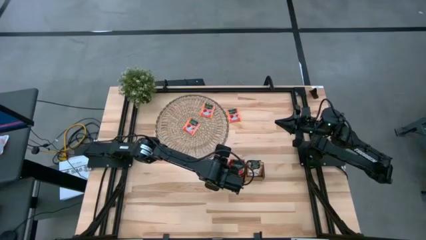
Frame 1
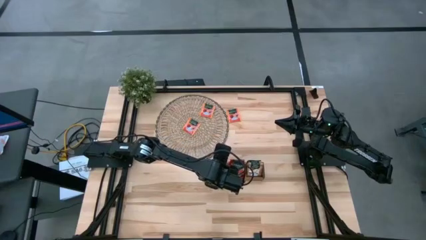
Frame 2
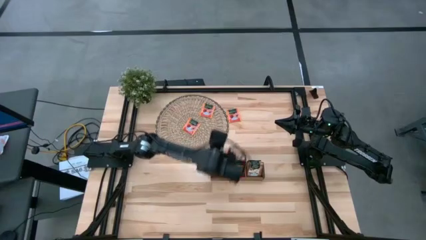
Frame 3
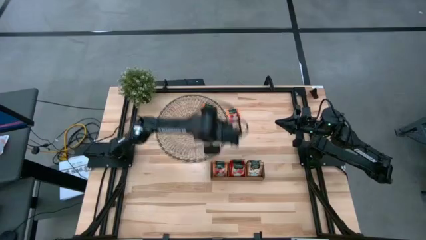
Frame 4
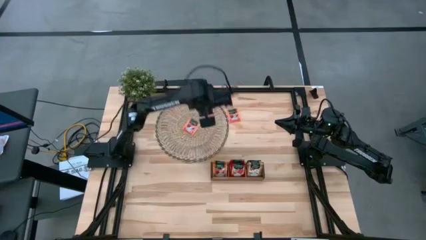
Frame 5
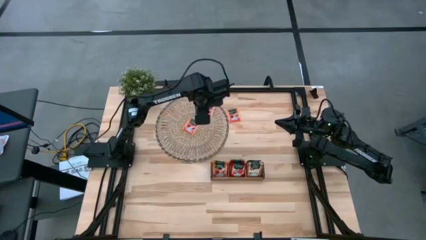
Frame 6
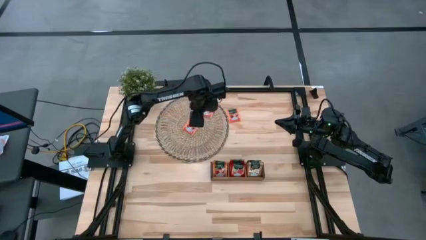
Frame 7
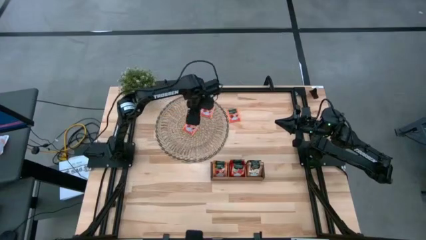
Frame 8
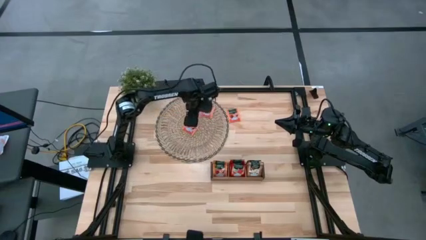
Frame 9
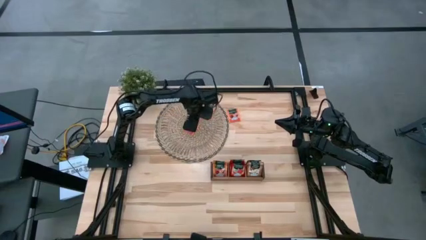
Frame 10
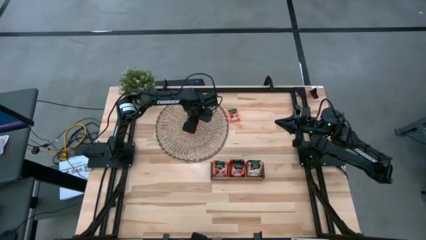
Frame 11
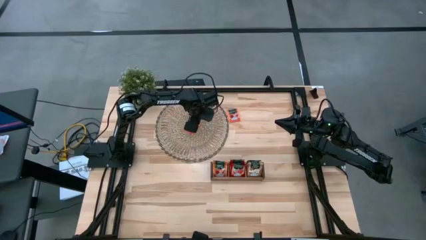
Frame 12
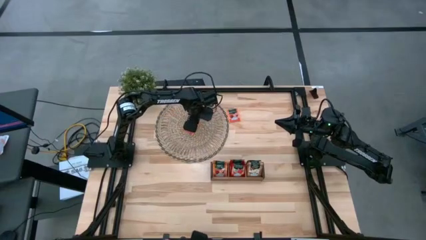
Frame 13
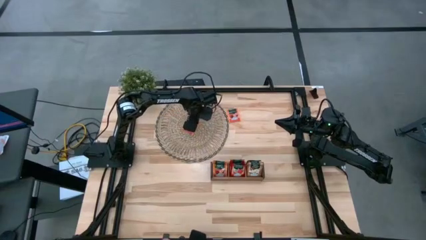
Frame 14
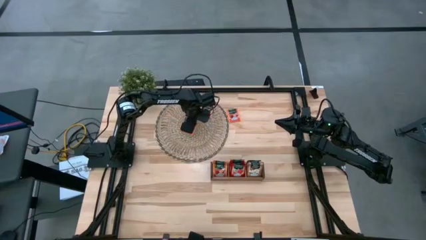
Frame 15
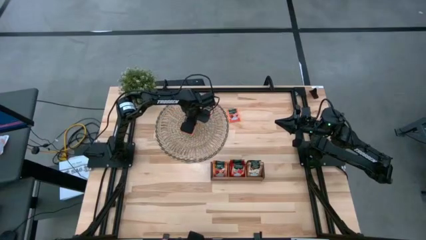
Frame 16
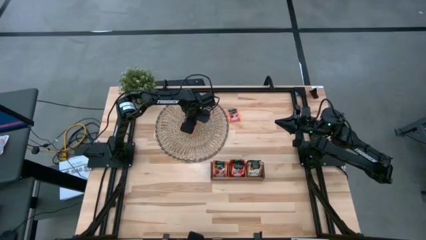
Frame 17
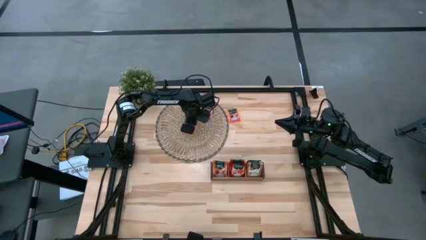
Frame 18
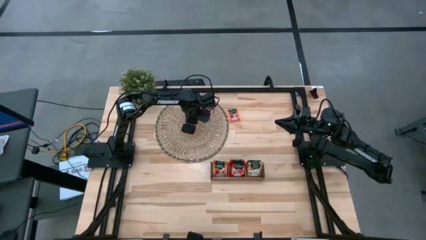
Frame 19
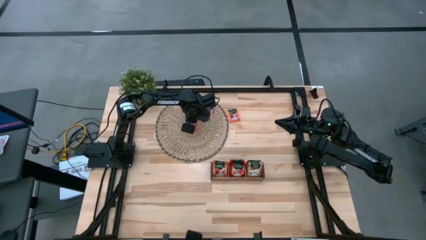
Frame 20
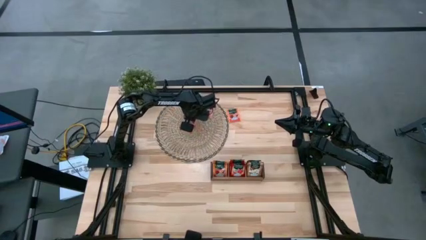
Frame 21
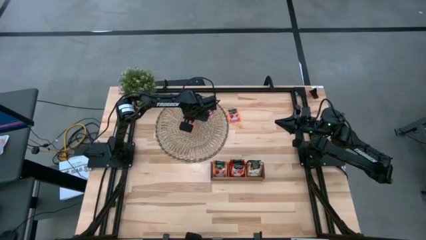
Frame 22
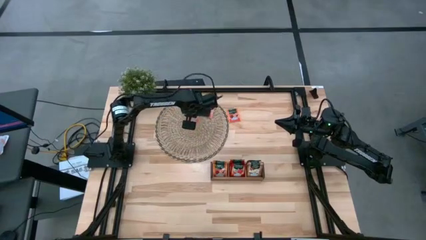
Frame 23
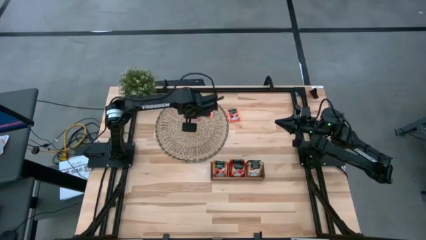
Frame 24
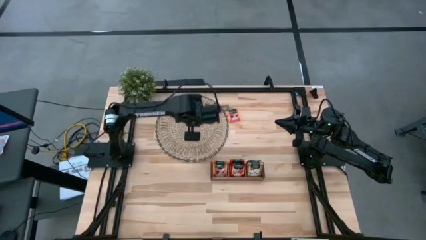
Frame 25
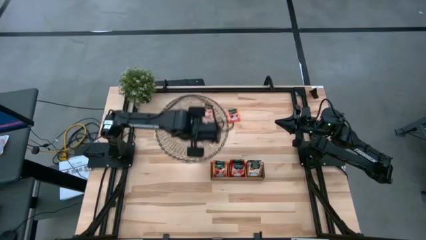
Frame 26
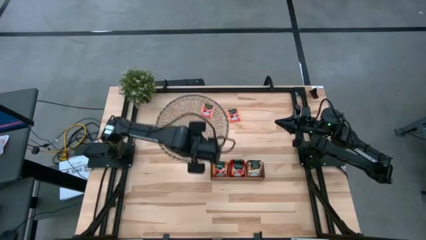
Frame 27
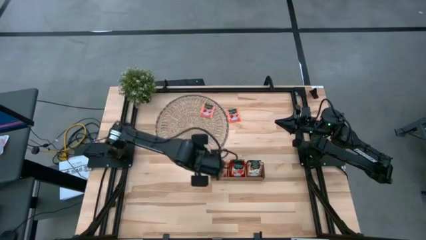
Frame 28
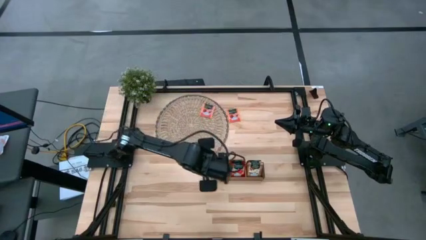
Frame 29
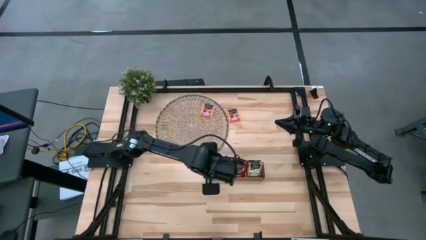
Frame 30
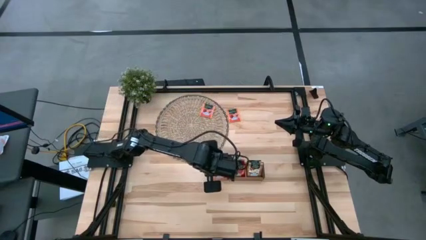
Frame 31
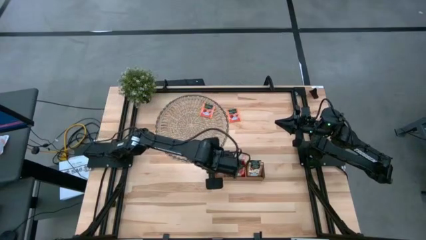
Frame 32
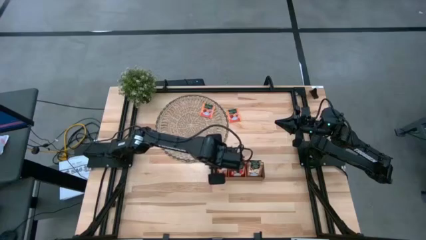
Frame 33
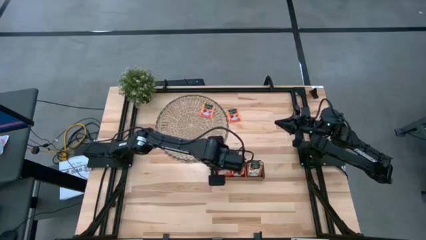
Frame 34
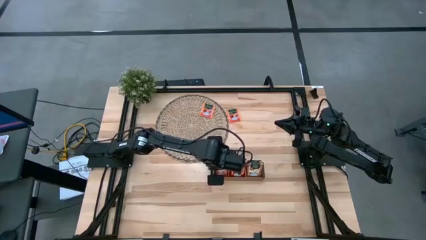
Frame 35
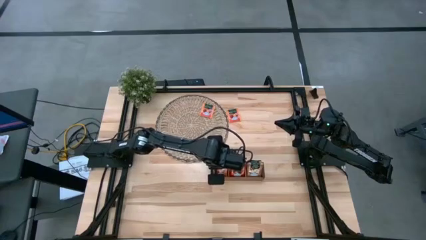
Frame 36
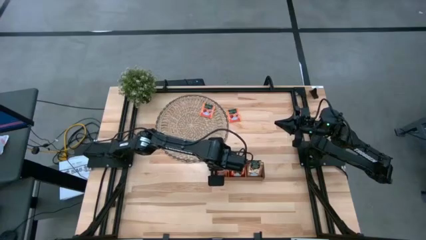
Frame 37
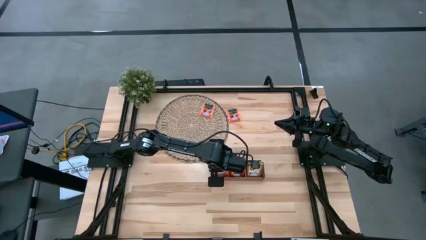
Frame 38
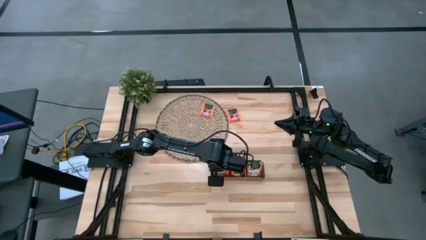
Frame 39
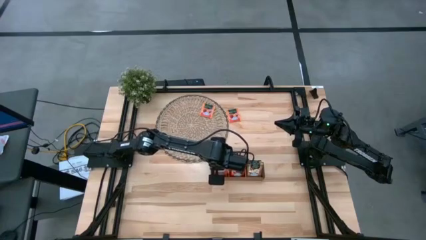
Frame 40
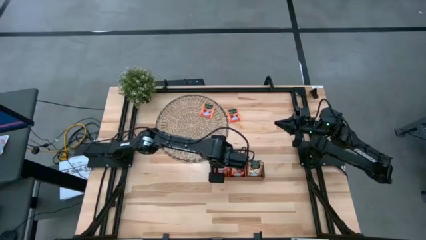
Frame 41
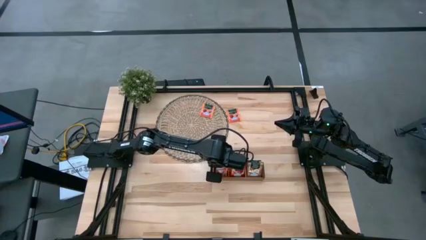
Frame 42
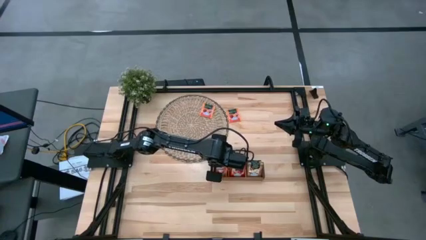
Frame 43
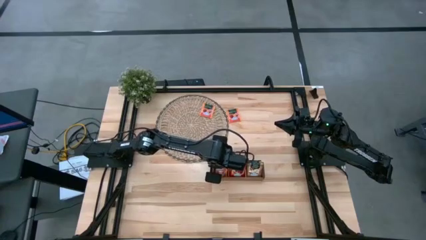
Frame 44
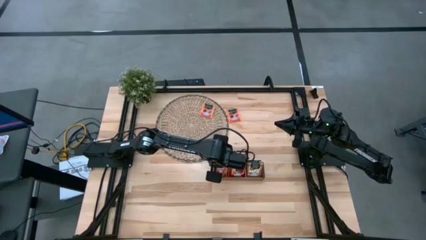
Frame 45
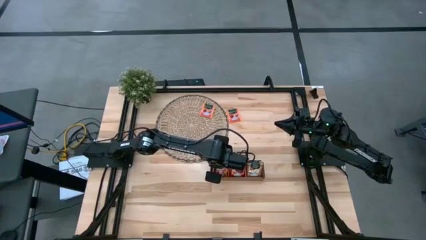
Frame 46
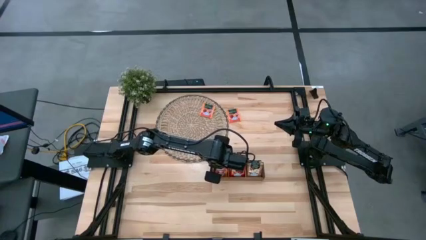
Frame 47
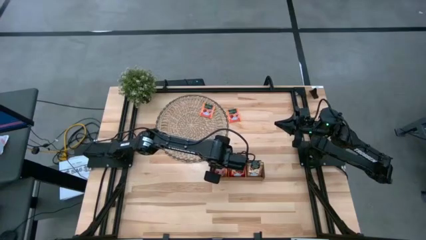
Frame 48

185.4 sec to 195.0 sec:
Task: Pick & Place Tea
Put the bottom orange tea bag into the left slot of the wooden organizer

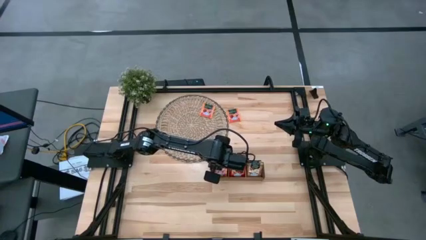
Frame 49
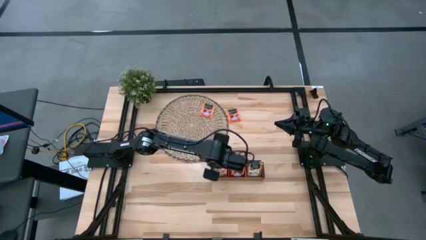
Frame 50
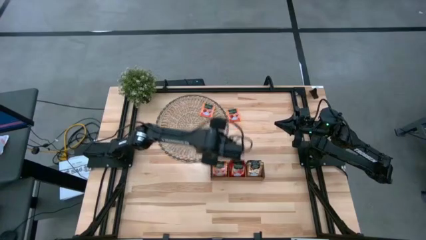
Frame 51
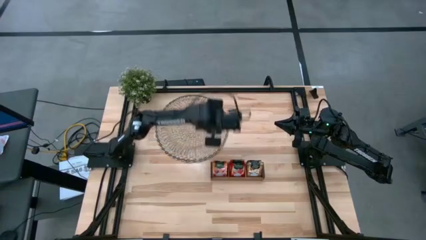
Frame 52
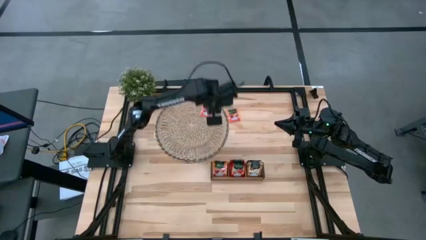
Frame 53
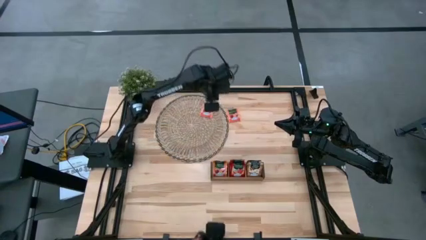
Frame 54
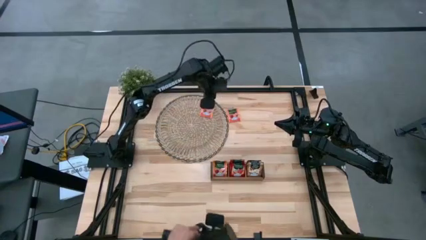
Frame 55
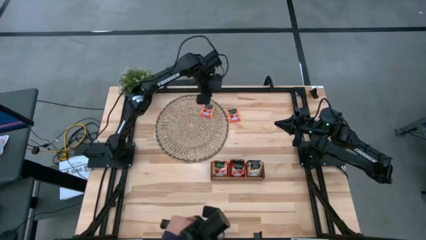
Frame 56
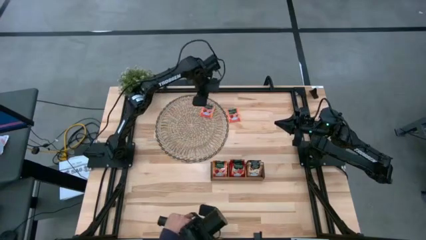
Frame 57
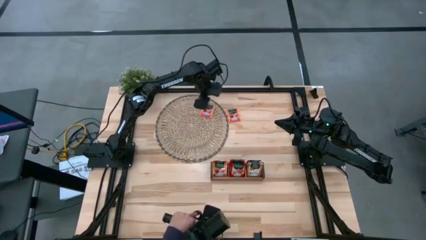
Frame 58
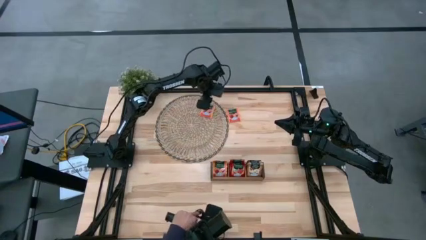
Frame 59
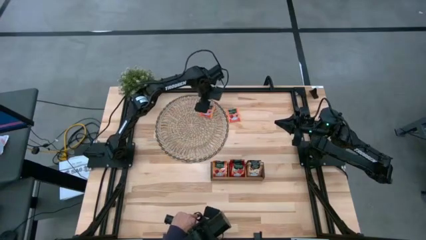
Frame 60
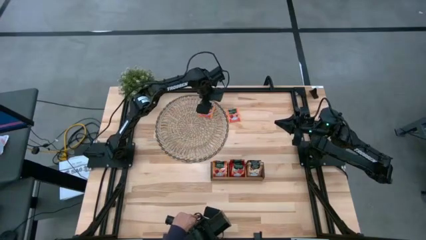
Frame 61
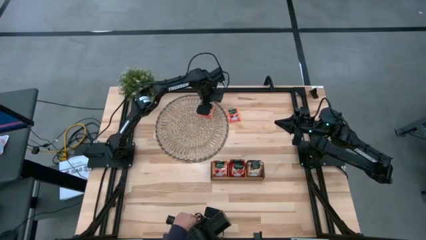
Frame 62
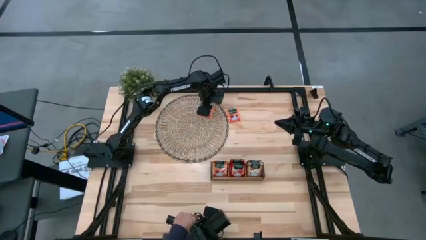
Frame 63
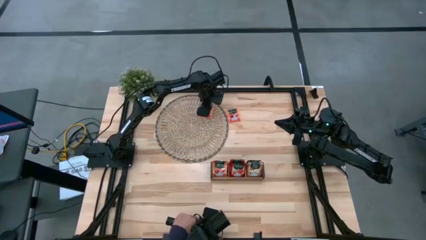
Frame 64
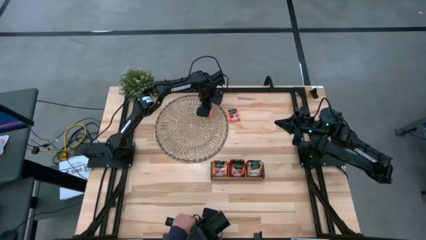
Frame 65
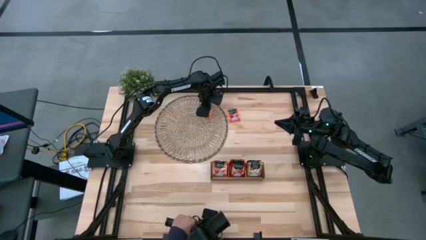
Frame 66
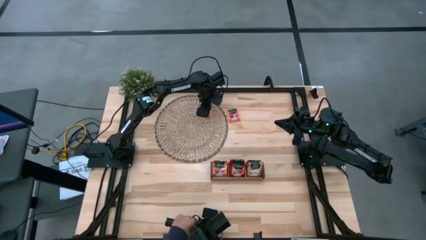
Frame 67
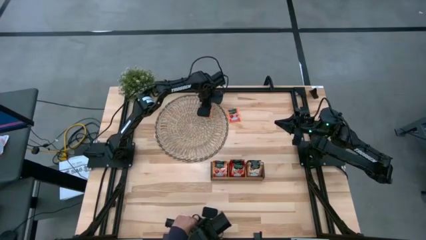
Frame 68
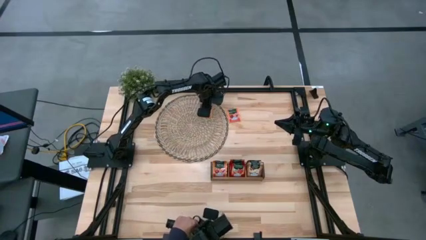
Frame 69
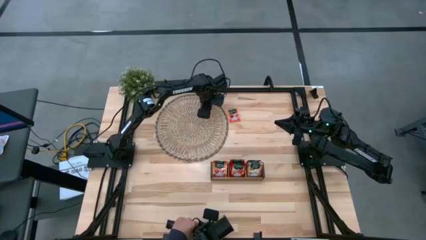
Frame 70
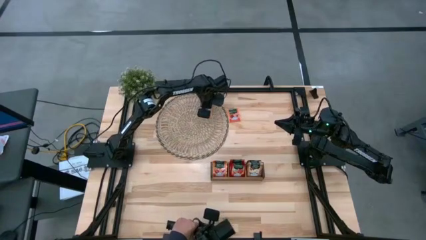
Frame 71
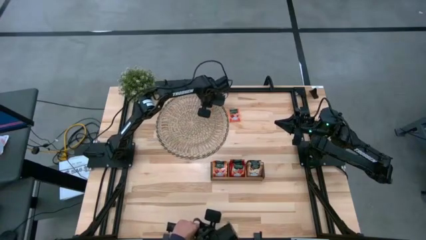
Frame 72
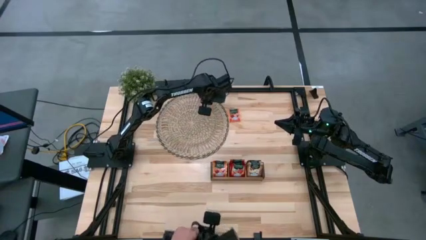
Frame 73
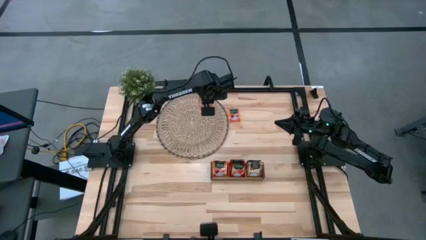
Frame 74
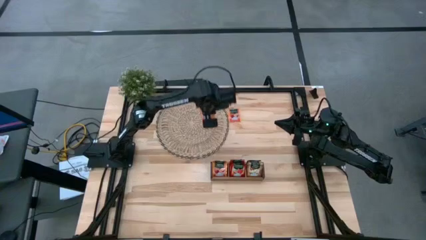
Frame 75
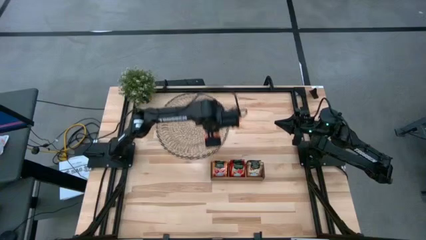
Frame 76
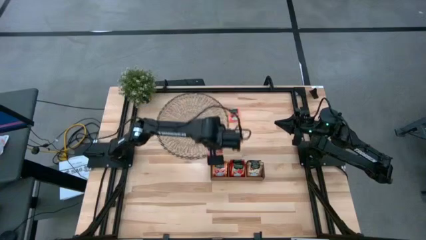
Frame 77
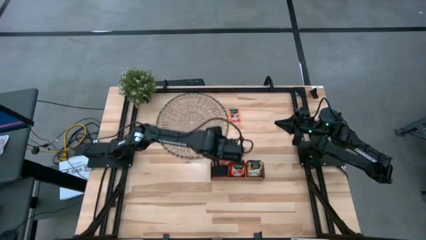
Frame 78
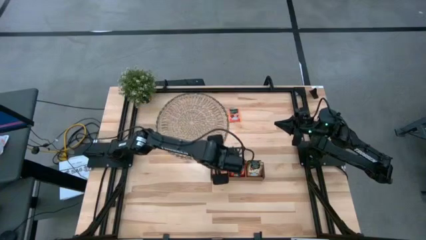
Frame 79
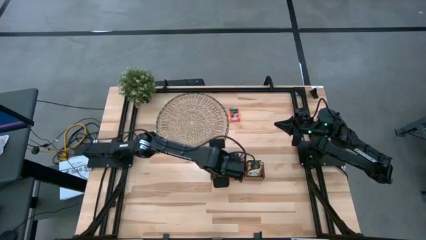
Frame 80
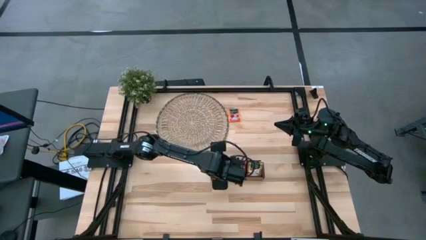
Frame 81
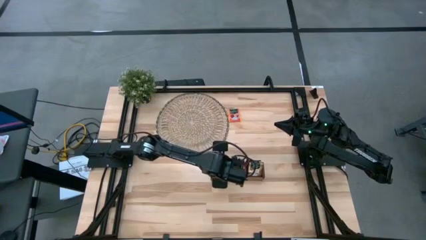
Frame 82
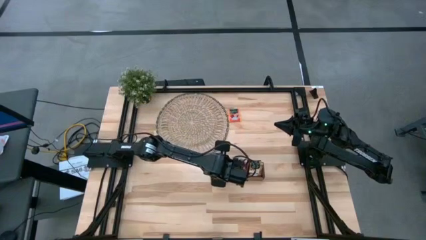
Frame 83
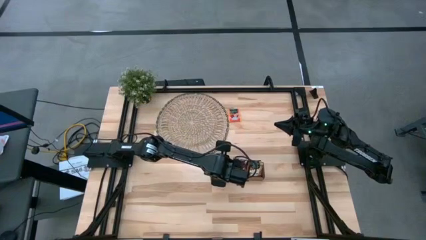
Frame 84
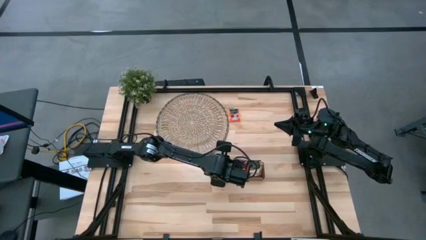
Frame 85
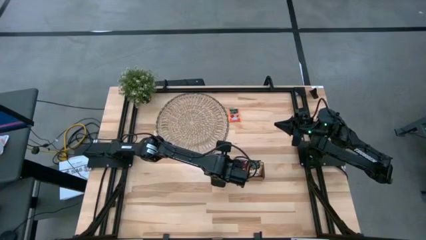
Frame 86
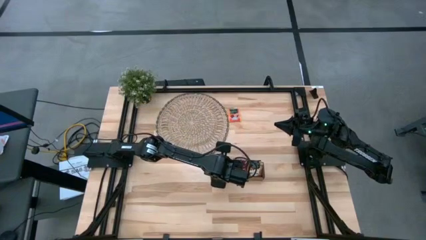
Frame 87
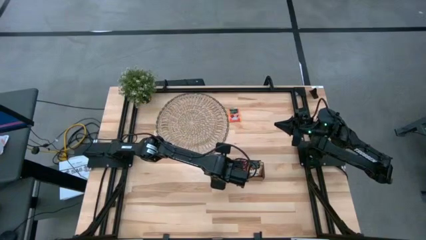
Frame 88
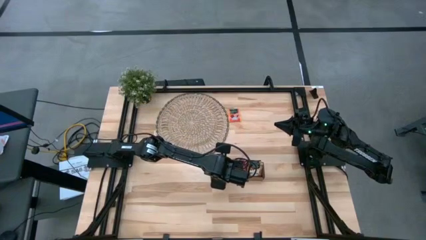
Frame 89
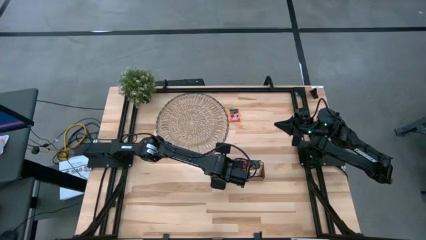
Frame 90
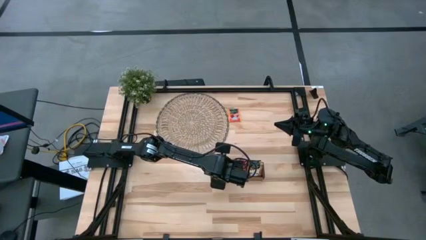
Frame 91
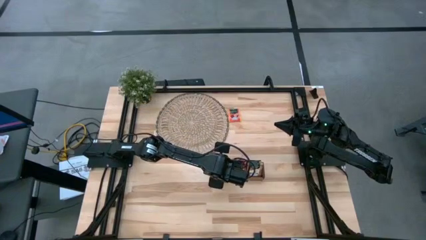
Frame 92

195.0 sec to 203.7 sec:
Put the left orange tea bag into the left slot of the wooden organizer
